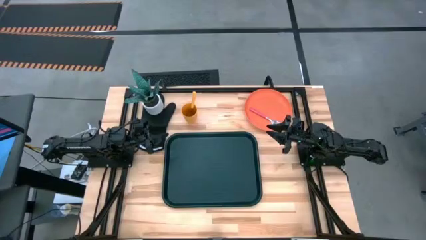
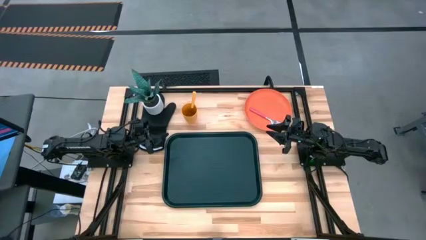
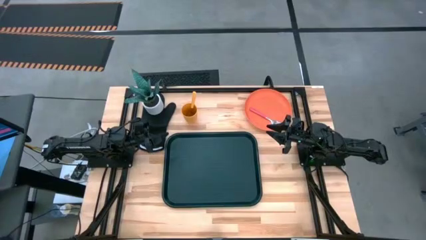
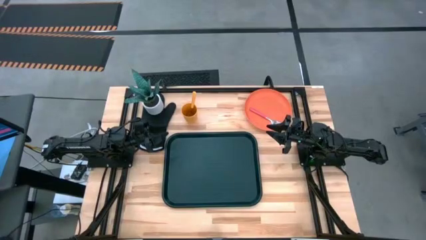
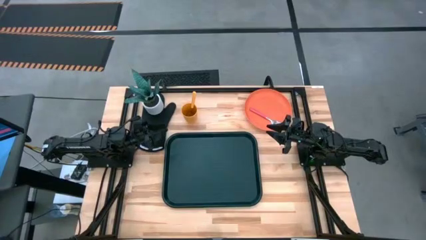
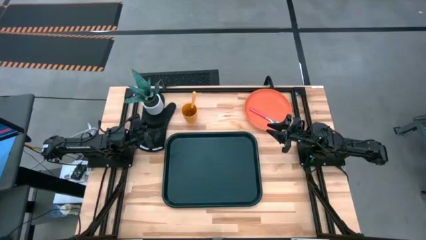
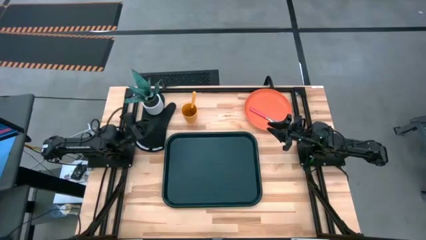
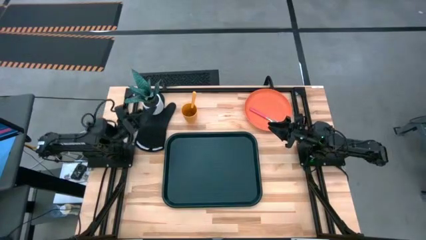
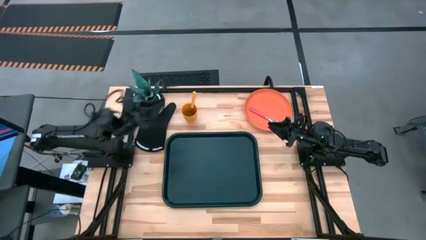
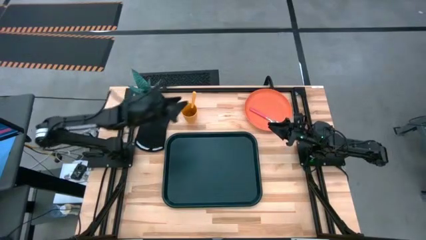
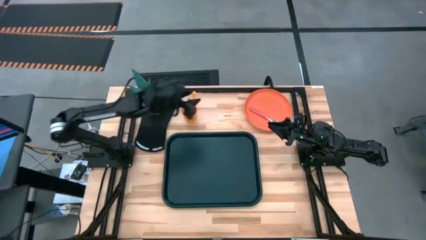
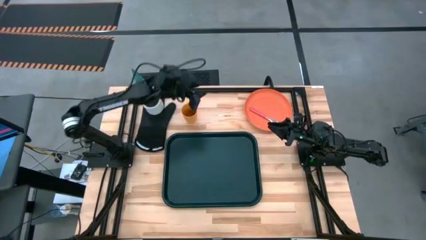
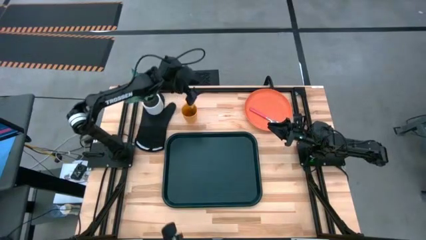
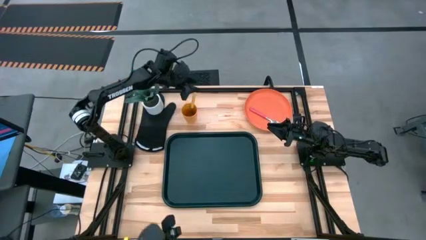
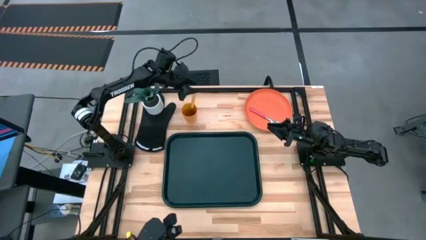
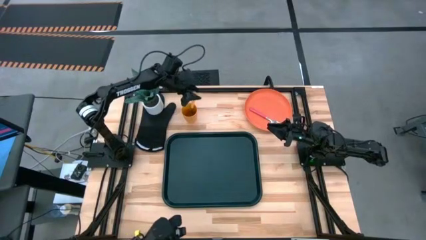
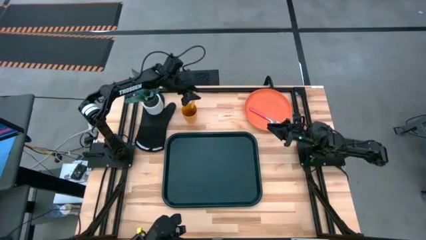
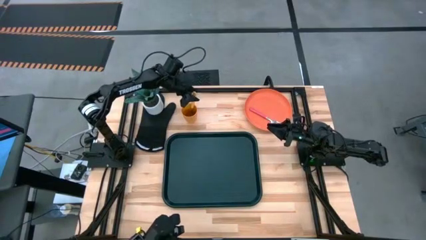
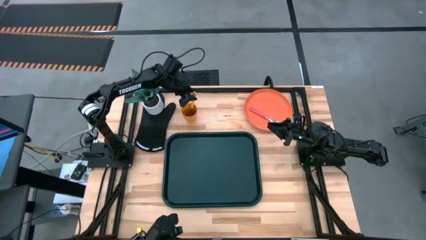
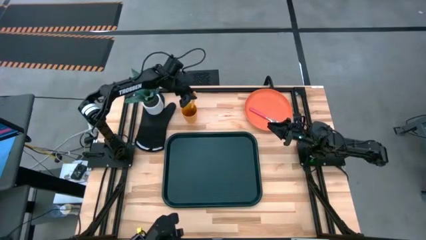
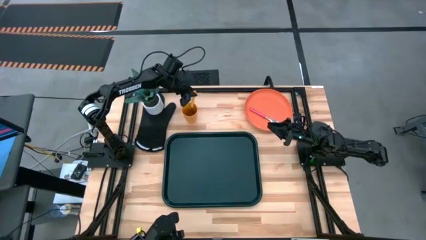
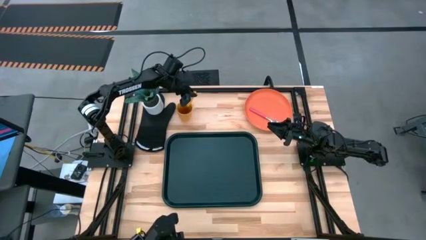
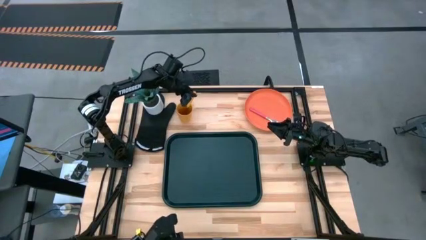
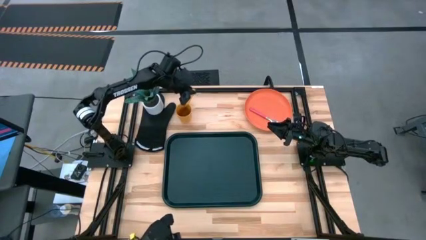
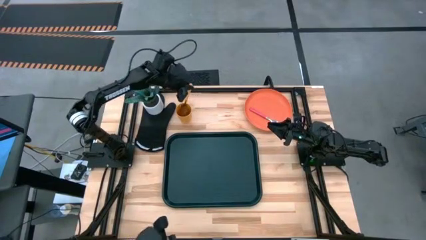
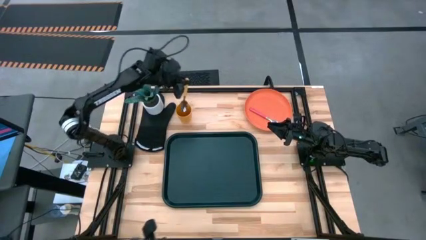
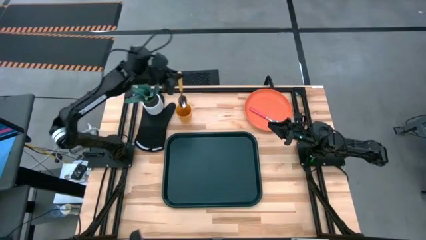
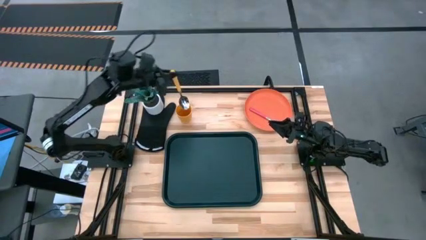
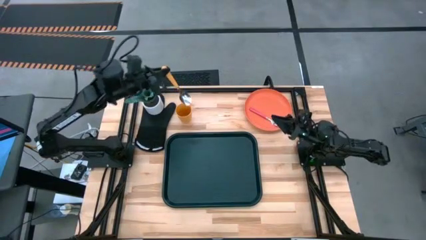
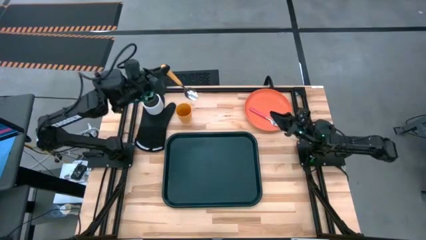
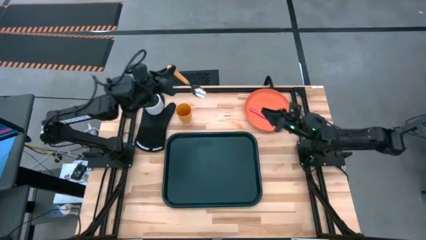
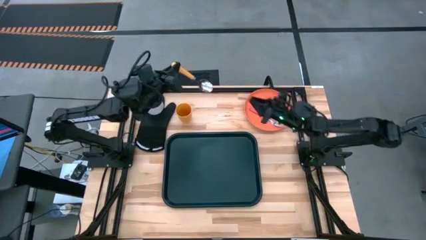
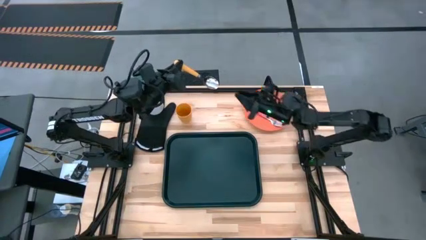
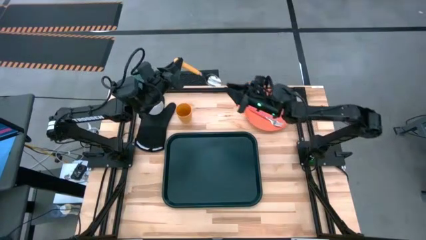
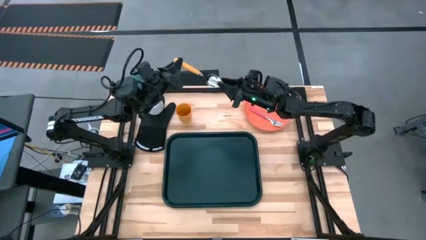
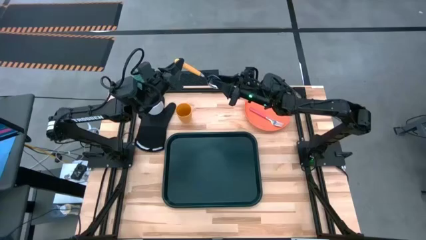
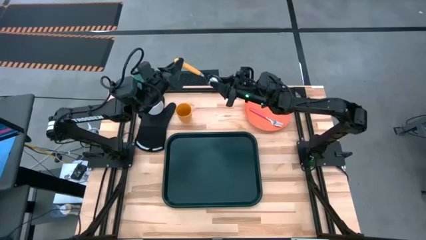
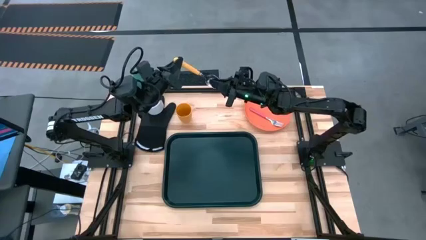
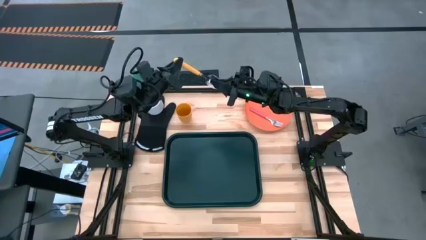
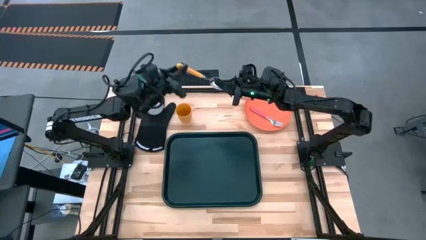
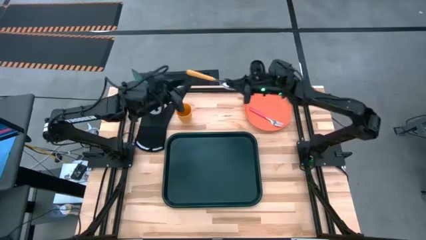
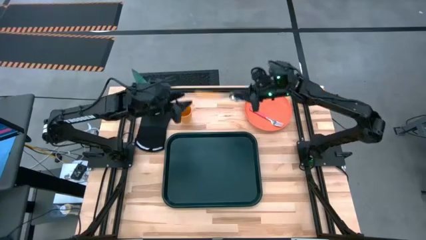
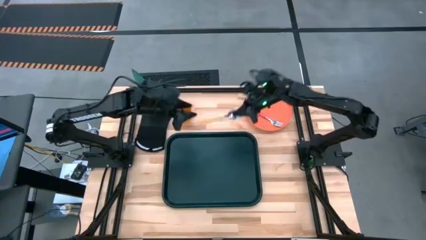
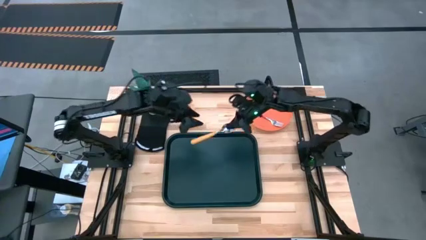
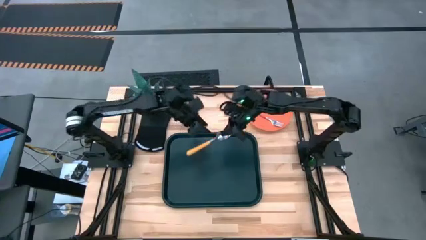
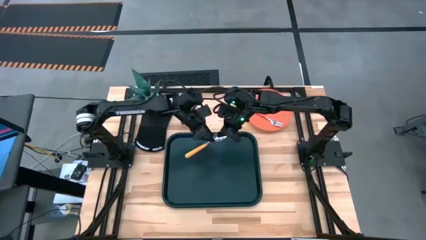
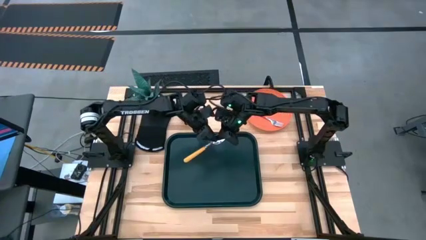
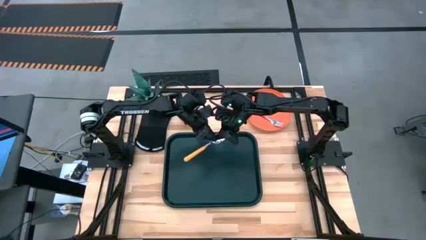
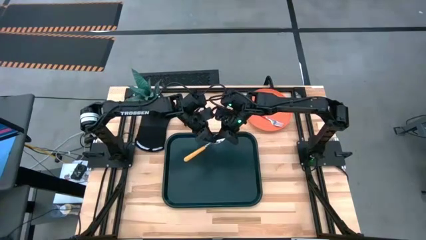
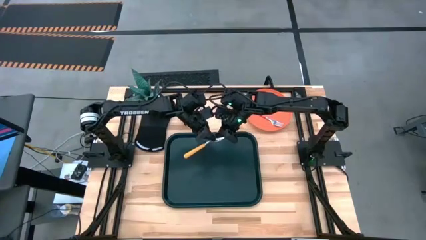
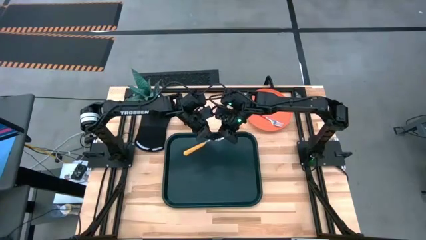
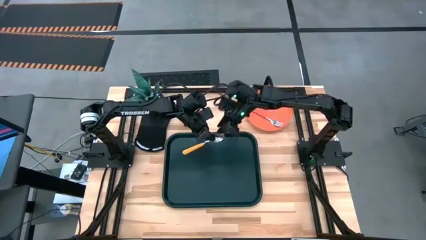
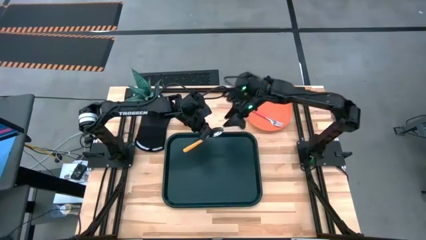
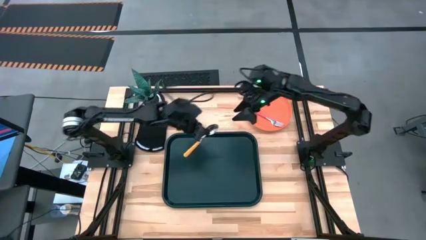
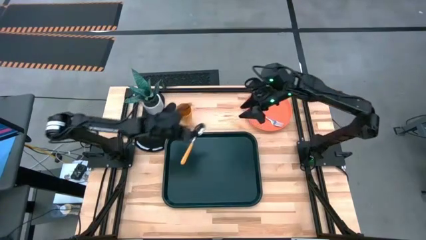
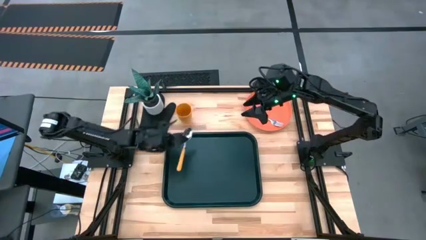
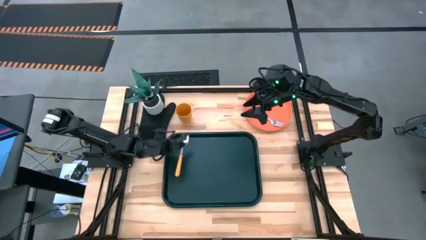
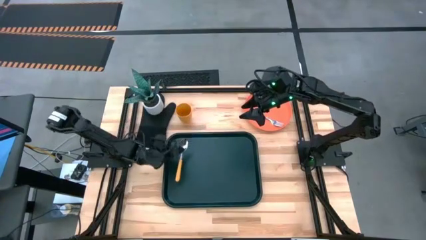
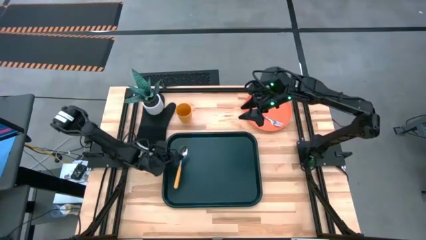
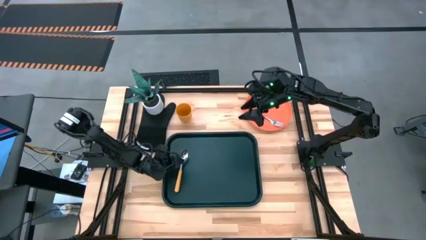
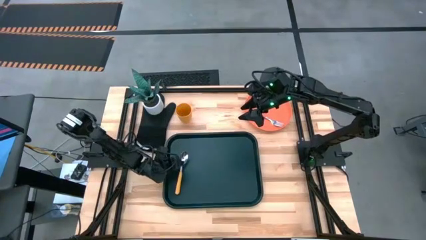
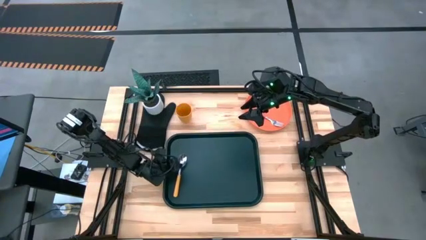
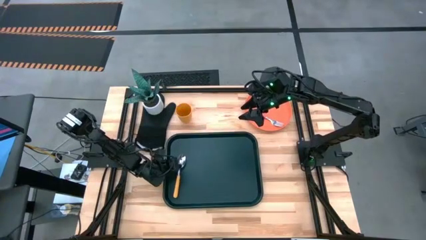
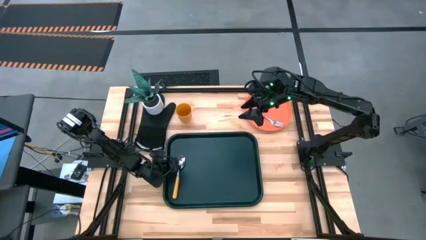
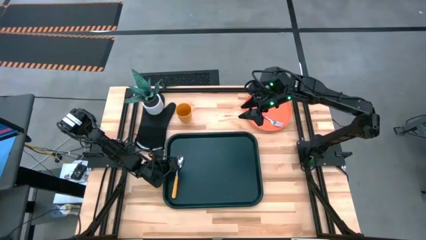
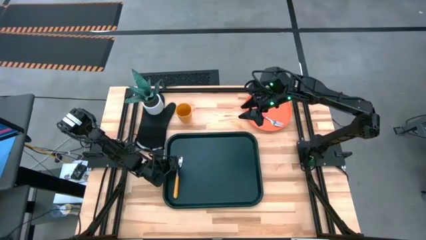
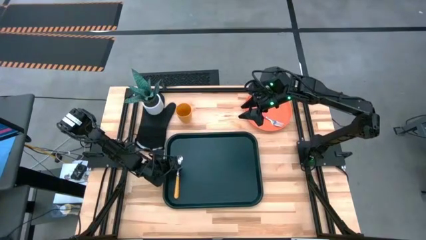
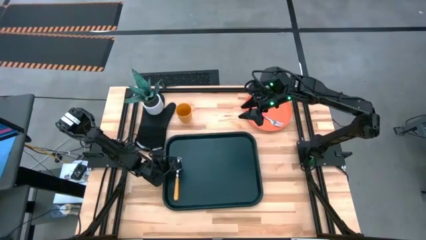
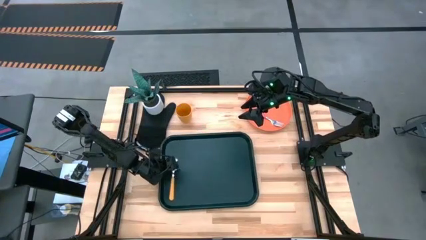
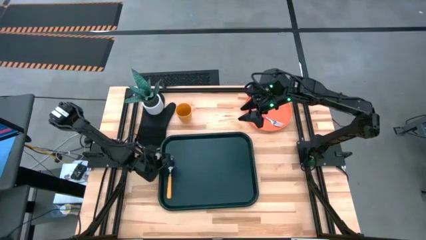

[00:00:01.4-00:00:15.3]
Task: Pick and place plate/cup/fork/spoon on tray
Put the yellow spoon on the left of the black serving tray
